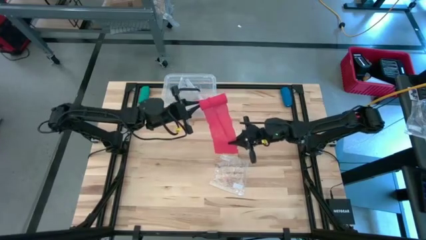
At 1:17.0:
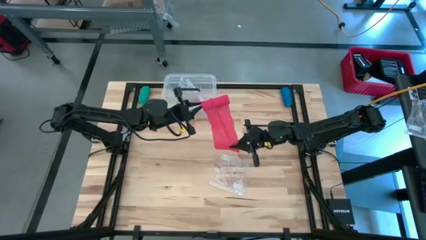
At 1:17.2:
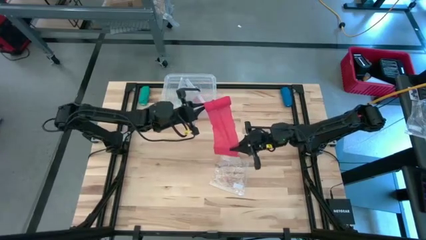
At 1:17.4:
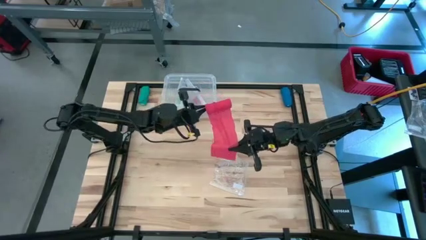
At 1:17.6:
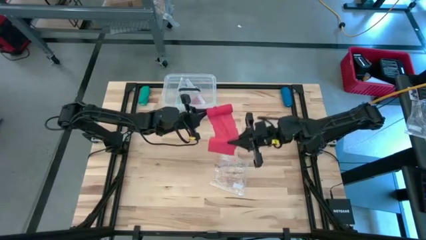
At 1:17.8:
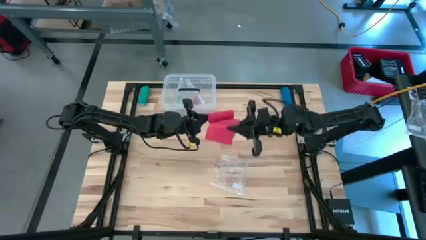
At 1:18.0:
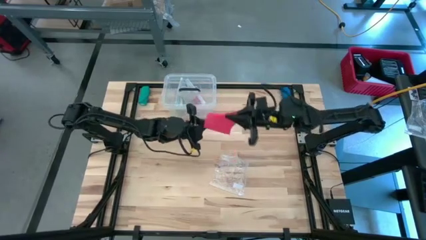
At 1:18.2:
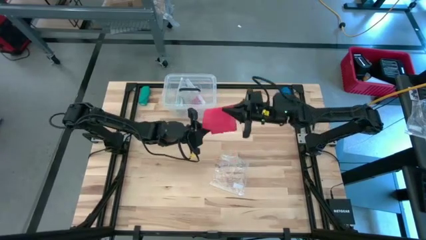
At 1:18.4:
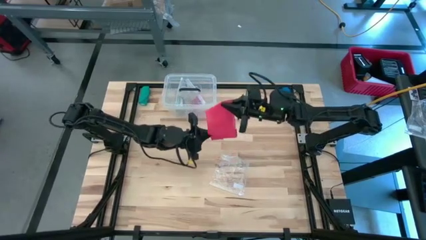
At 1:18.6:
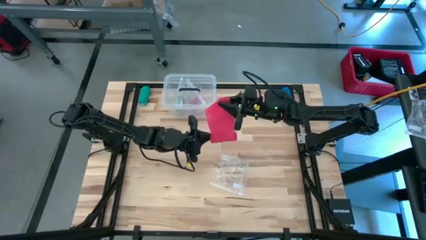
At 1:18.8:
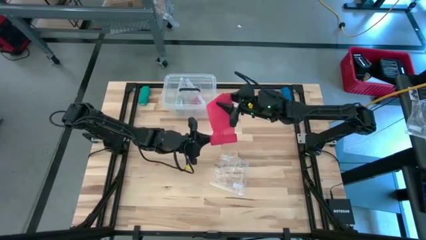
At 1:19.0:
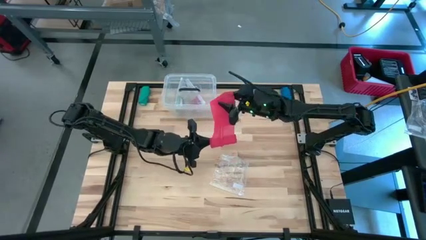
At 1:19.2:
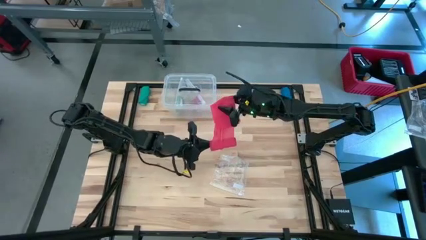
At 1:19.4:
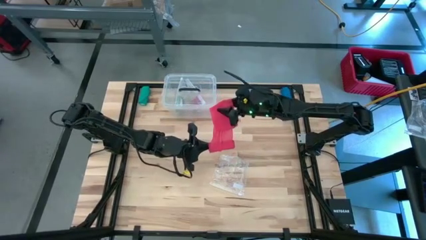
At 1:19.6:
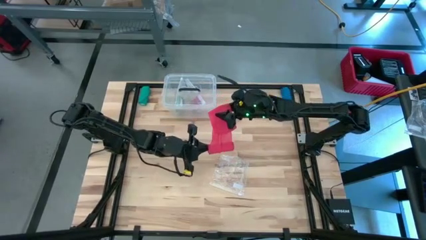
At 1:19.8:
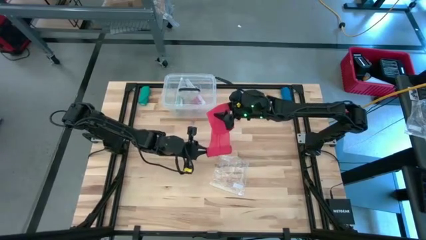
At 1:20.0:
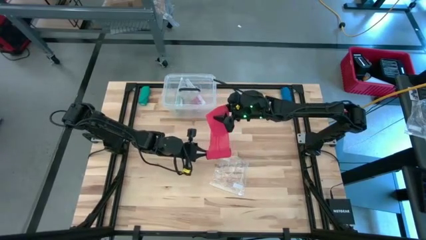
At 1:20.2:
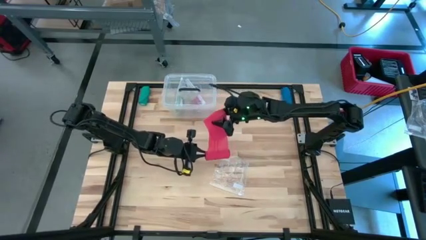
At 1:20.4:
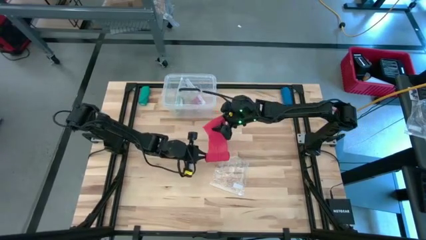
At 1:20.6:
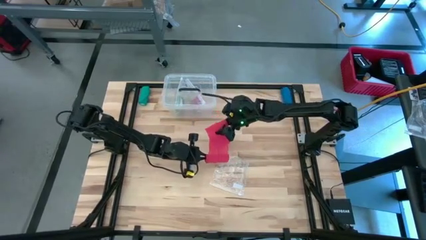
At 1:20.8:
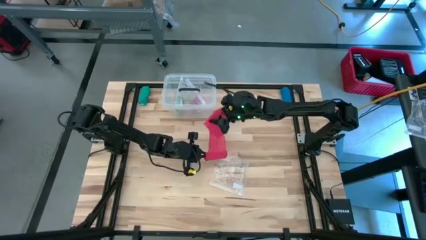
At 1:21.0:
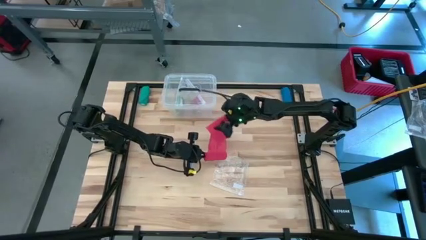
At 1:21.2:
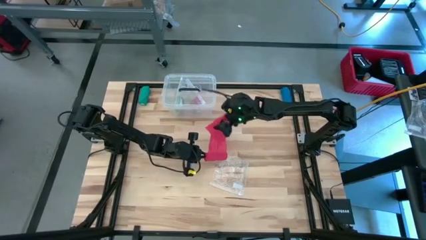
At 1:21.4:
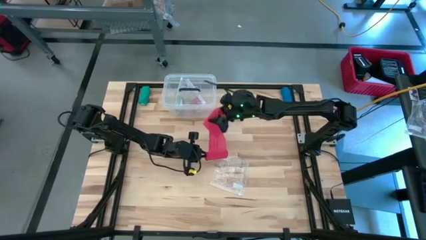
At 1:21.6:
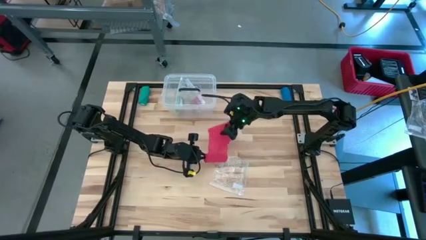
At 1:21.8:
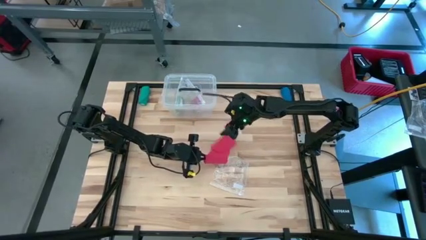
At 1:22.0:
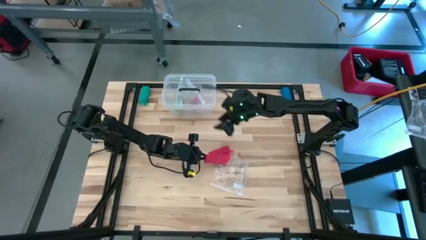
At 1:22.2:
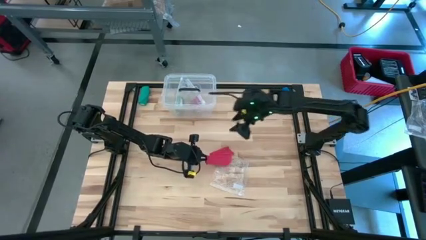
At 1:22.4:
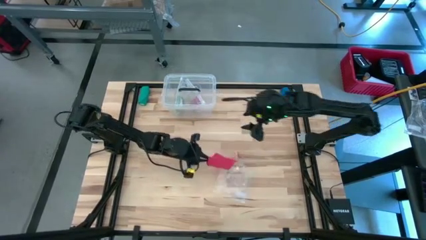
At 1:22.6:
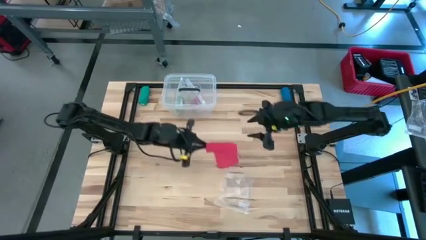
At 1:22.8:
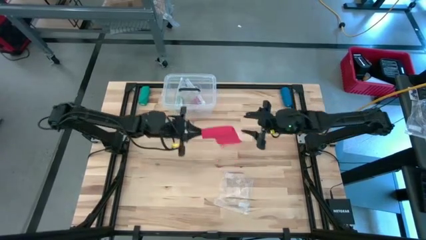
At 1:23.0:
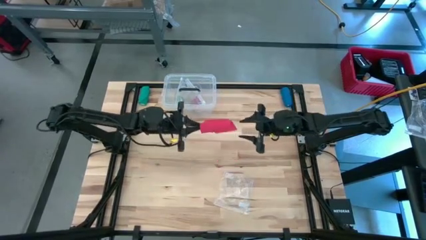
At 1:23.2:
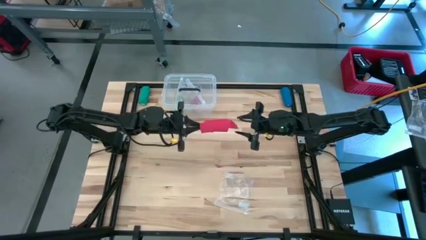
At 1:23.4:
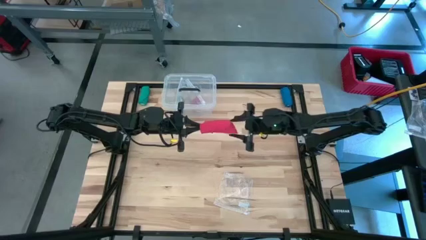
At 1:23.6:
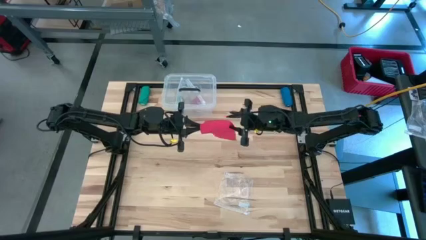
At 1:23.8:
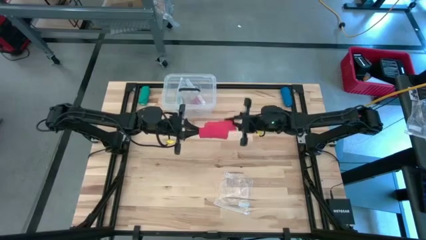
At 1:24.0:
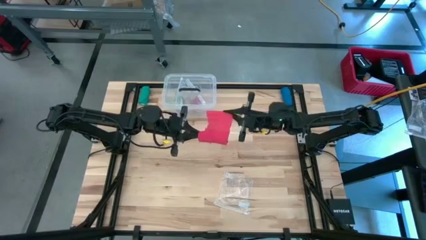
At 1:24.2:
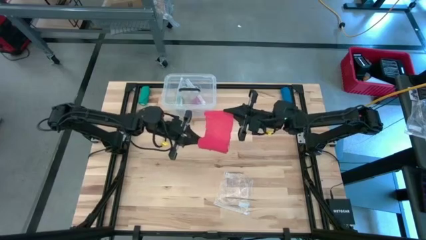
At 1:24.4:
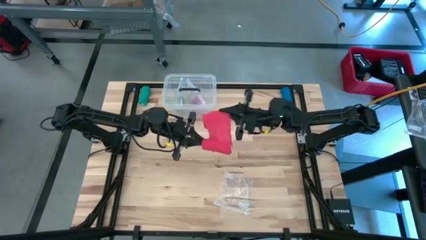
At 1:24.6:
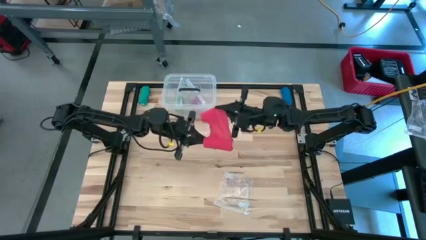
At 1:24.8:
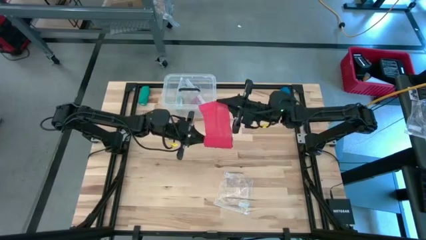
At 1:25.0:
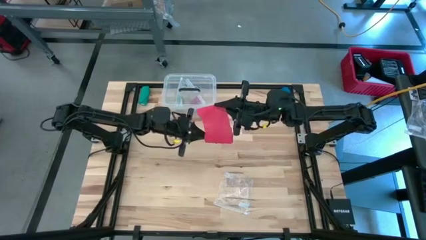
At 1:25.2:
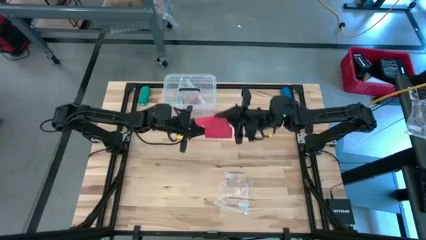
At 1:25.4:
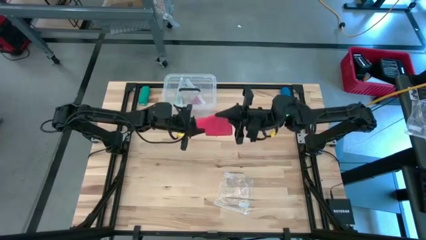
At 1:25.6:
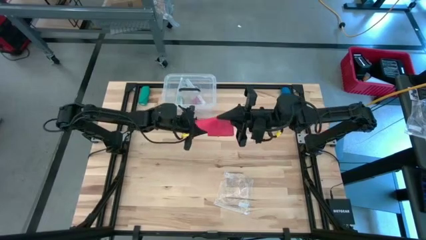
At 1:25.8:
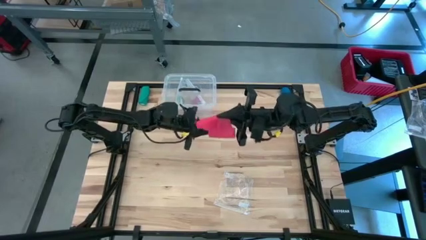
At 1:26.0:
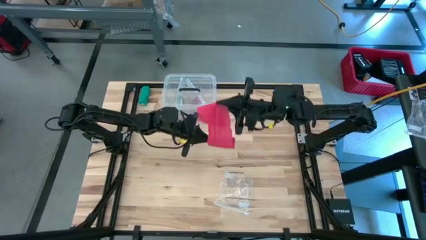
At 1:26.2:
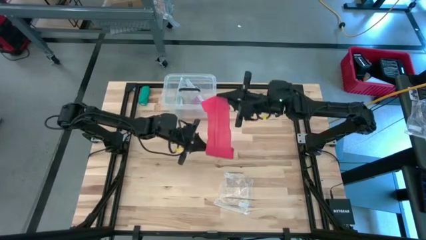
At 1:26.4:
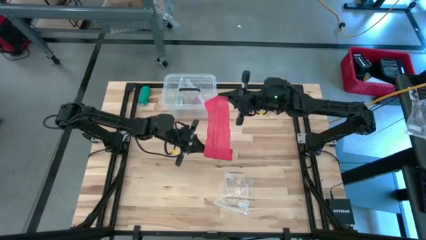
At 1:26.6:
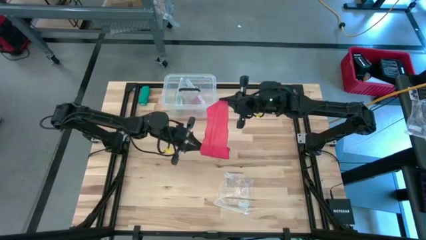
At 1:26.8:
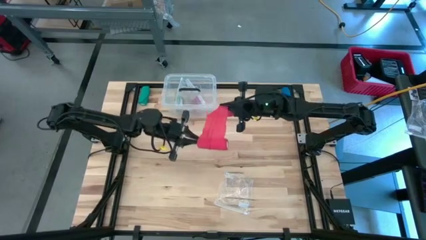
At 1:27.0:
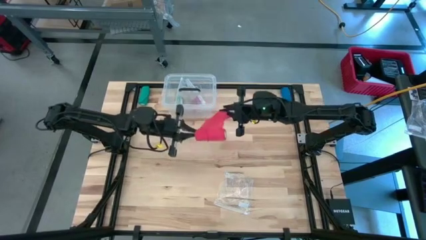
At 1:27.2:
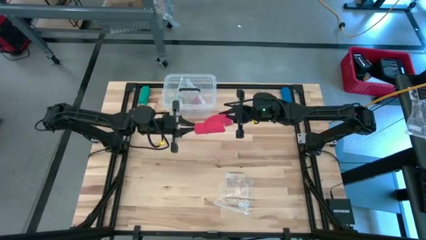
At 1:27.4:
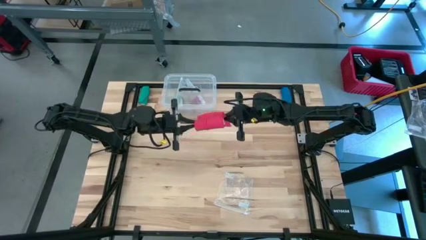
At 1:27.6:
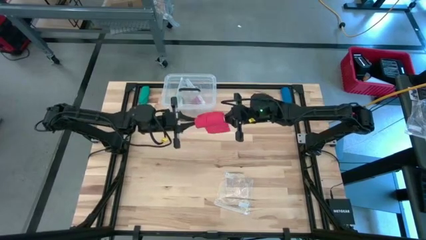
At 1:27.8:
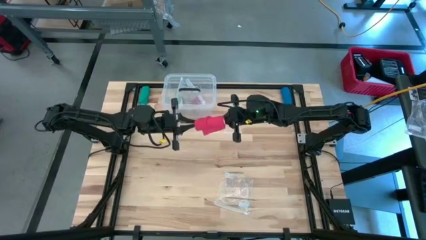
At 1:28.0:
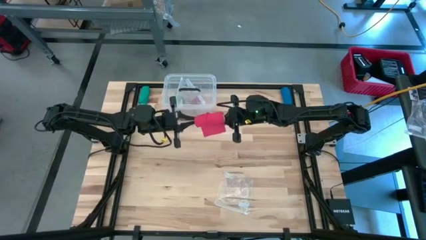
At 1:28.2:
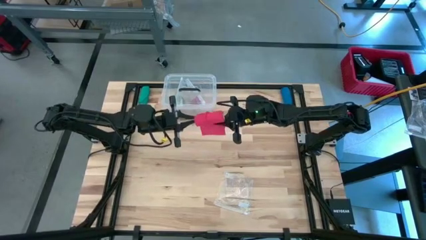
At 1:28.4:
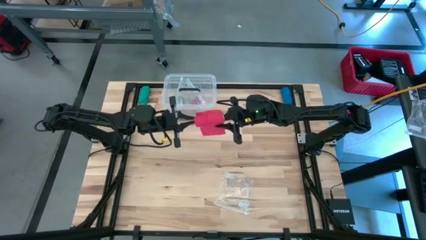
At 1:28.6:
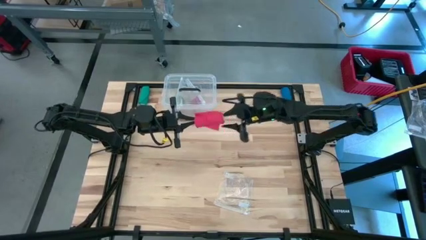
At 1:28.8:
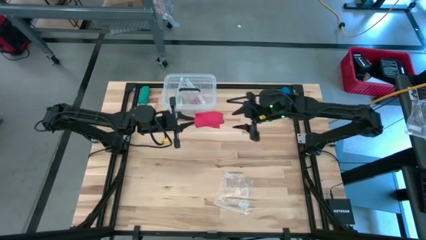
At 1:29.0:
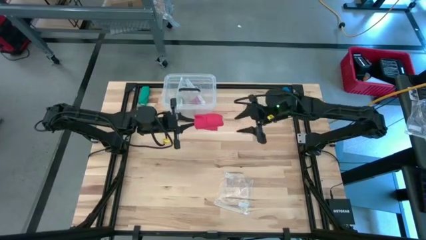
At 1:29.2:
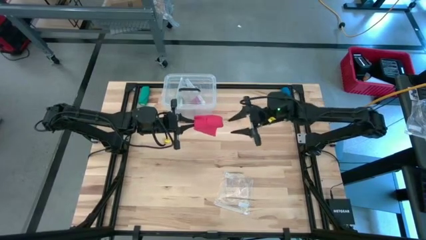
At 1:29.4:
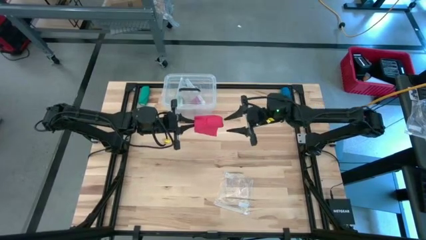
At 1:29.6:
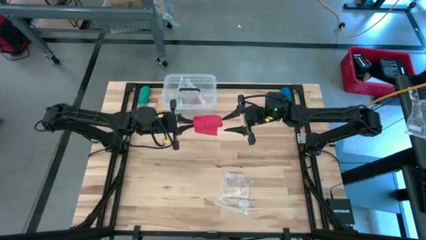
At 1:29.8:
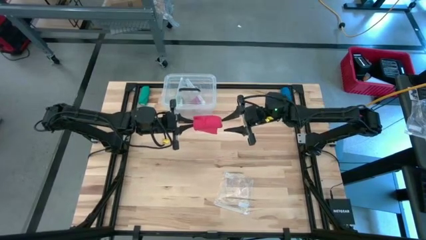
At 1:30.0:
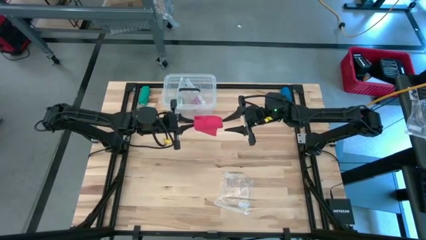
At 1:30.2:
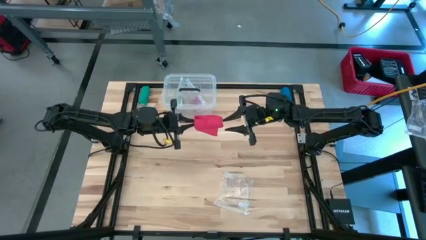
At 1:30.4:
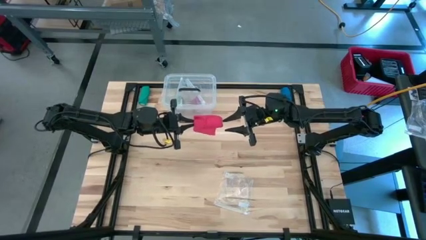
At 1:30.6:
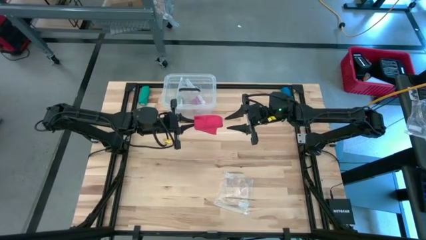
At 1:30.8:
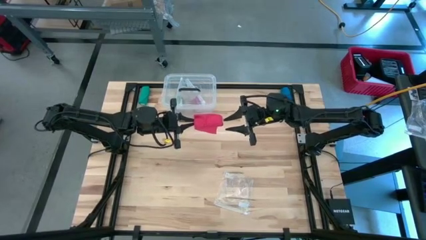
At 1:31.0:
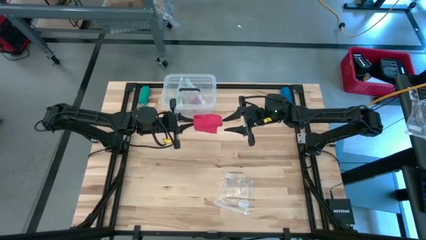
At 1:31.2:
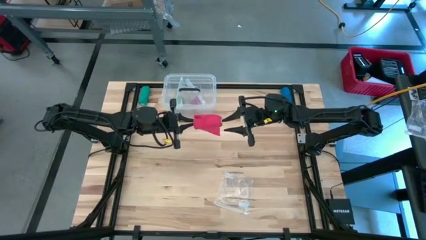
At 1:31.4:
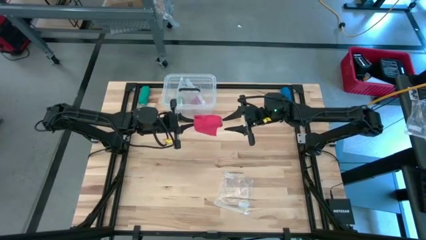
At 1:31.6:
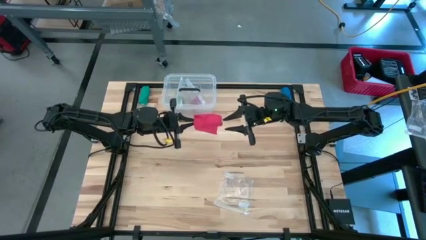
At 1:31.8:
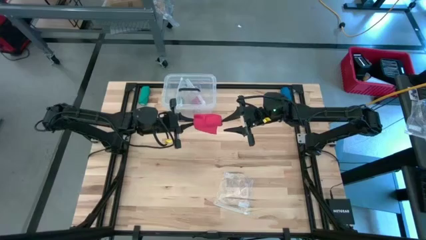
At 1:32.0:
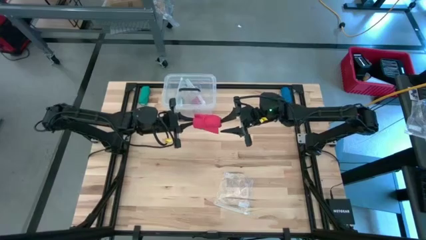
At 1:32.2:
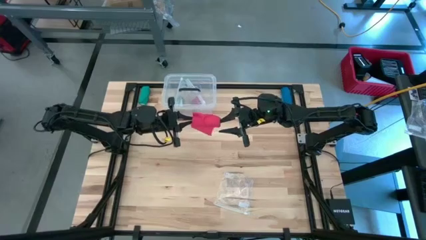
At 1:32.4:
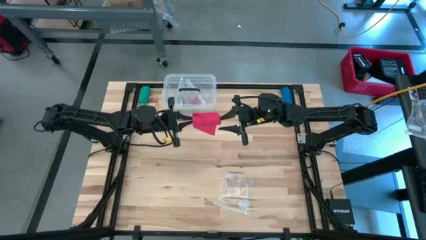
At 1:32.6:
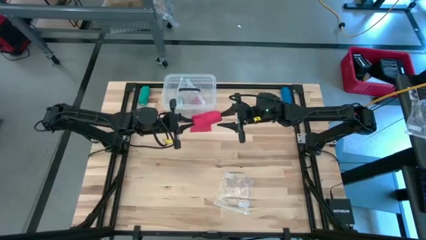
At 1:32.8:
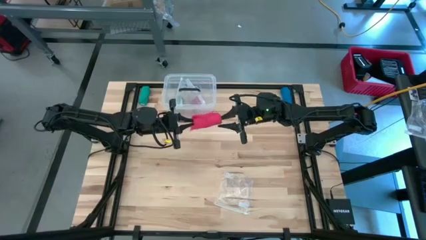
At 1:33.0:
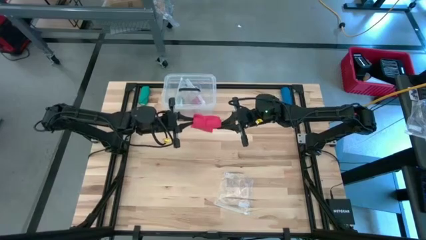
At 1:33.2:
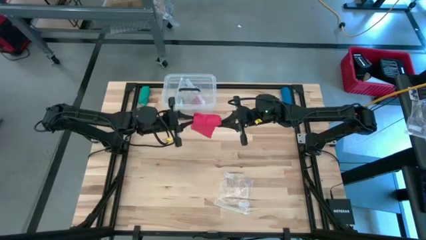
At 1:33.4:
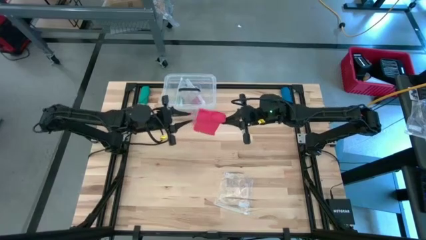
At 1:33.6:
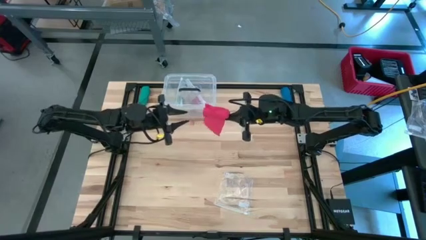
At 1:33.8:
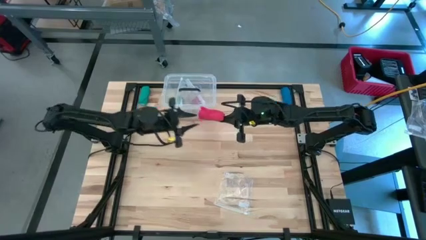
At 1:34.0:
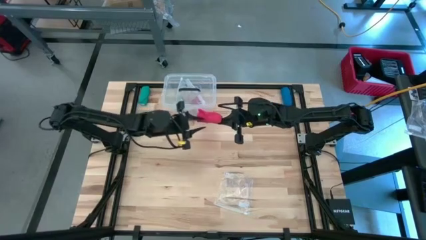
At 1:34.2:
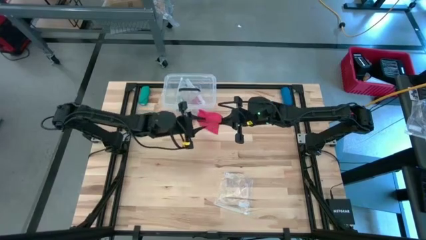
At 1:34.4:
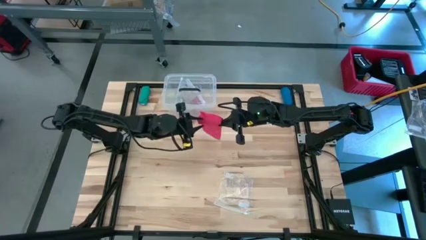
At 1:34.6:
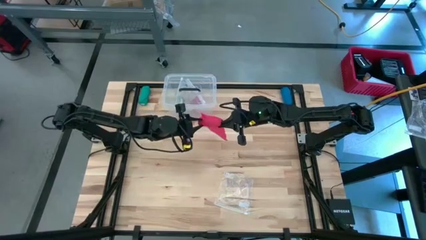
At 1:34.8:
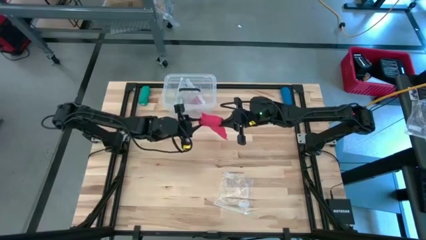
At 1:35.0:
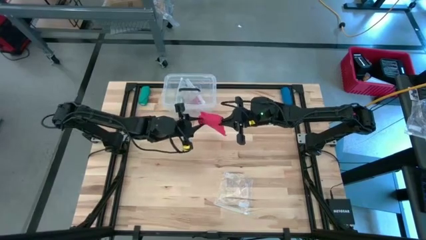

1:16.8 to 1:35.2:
Task: Roll bandage
Roll the red bandage
